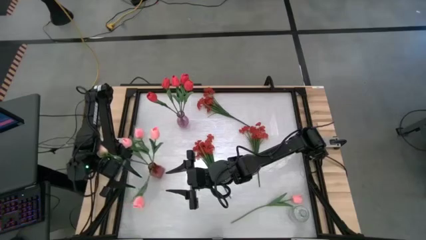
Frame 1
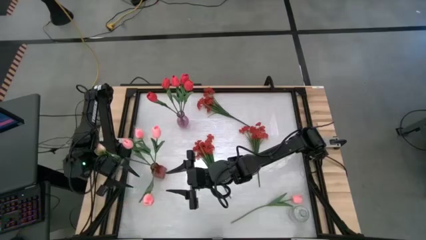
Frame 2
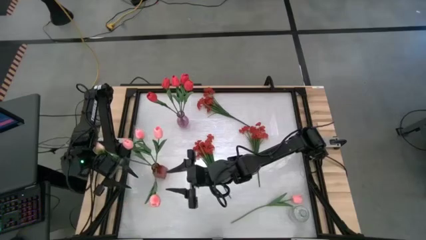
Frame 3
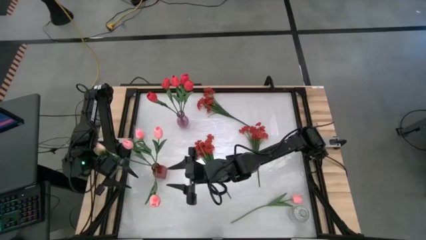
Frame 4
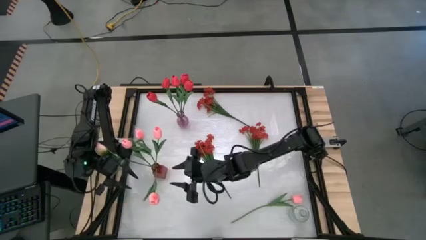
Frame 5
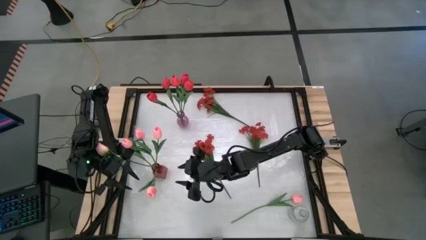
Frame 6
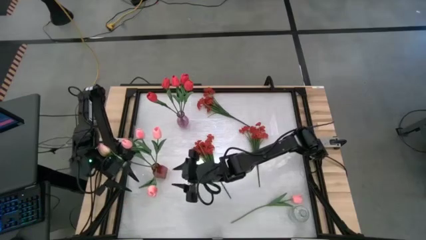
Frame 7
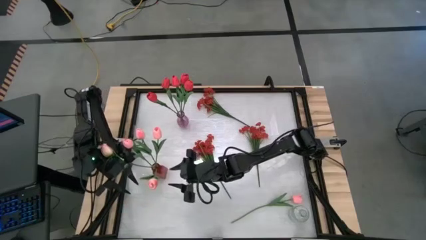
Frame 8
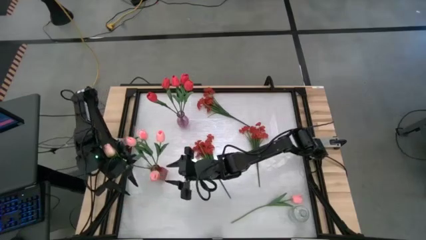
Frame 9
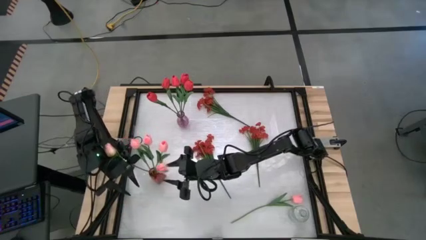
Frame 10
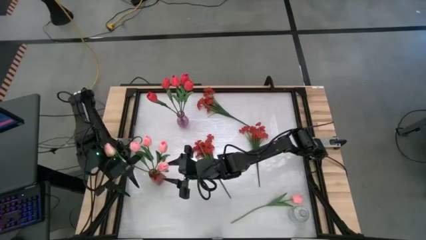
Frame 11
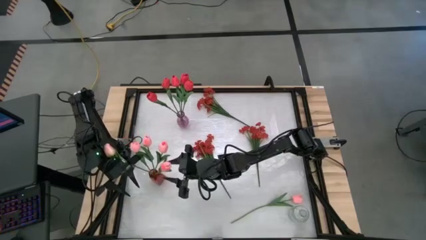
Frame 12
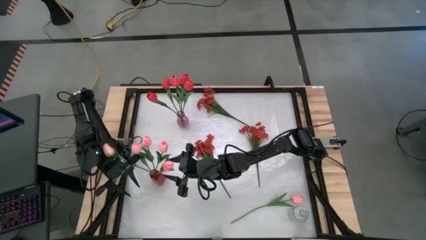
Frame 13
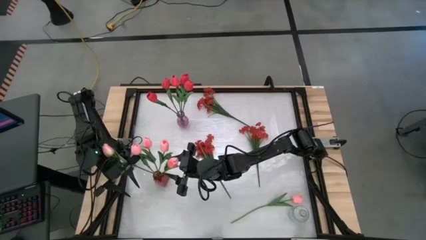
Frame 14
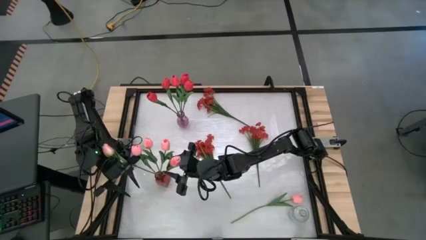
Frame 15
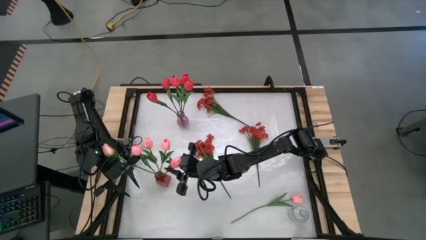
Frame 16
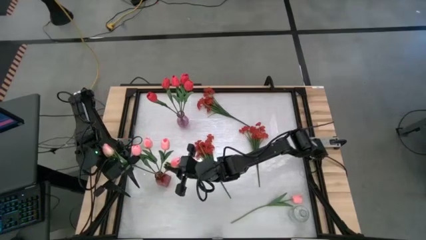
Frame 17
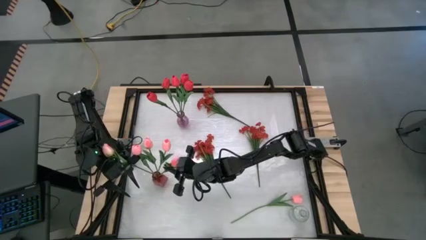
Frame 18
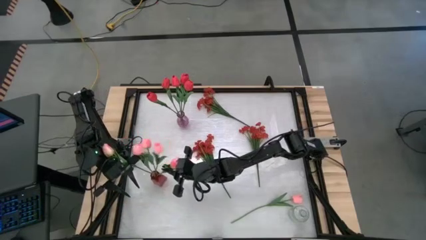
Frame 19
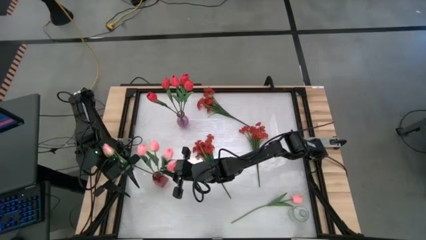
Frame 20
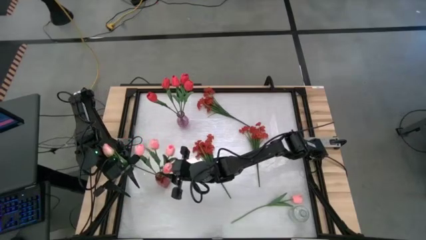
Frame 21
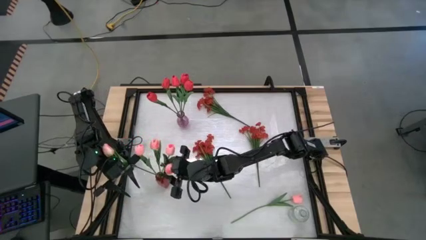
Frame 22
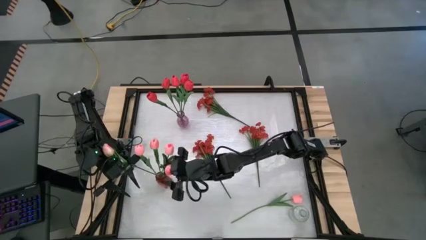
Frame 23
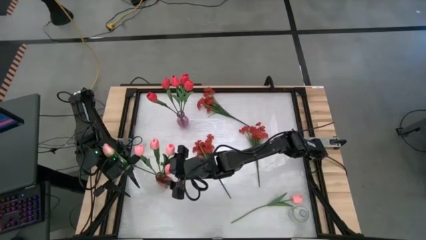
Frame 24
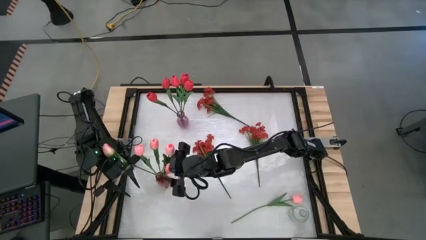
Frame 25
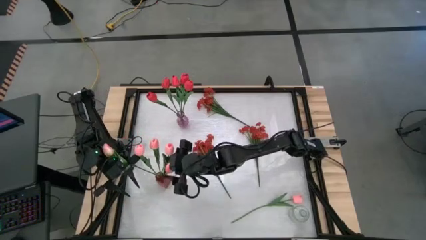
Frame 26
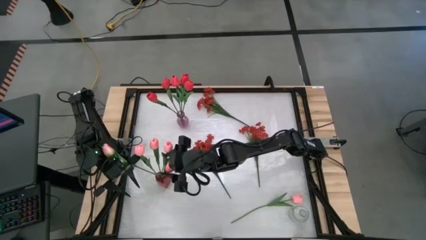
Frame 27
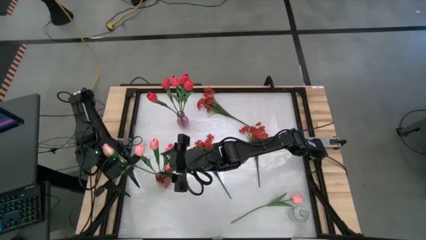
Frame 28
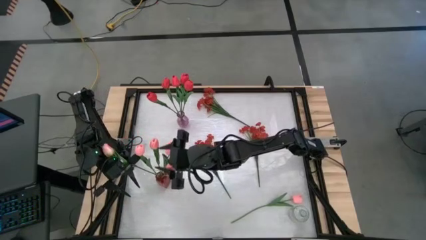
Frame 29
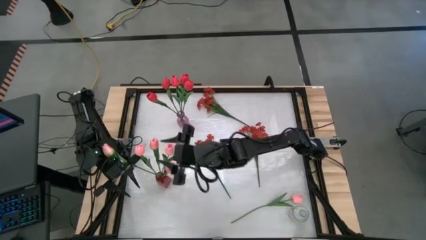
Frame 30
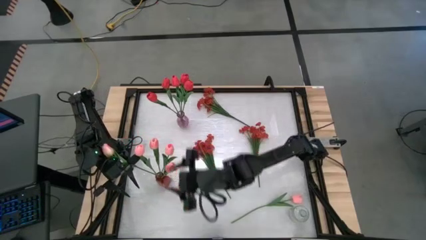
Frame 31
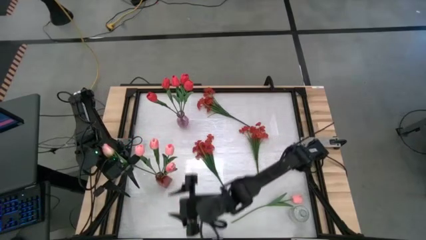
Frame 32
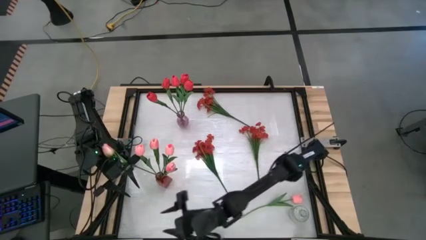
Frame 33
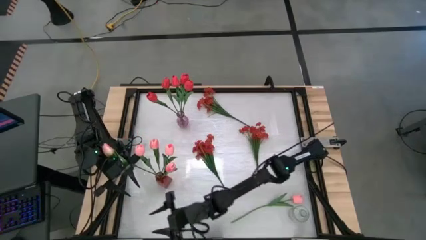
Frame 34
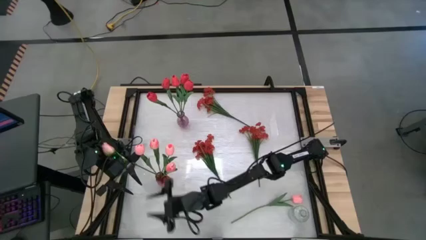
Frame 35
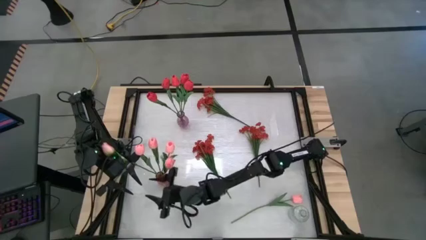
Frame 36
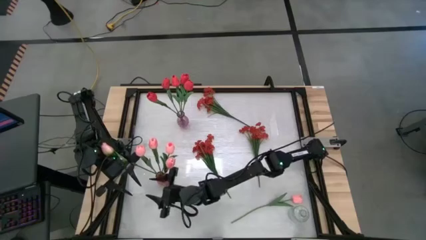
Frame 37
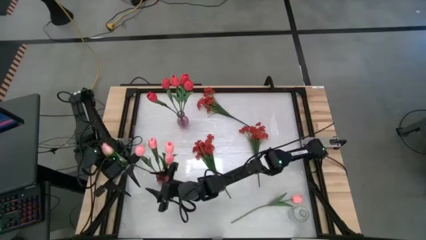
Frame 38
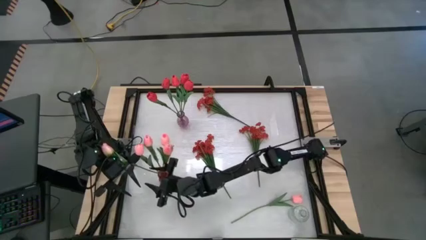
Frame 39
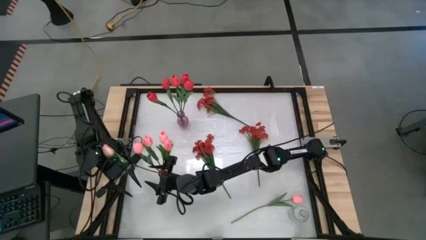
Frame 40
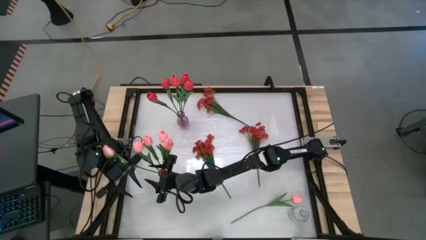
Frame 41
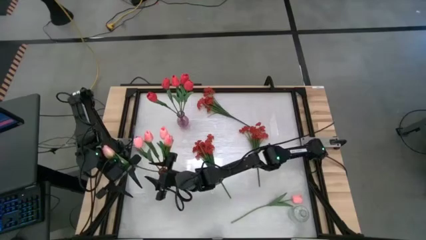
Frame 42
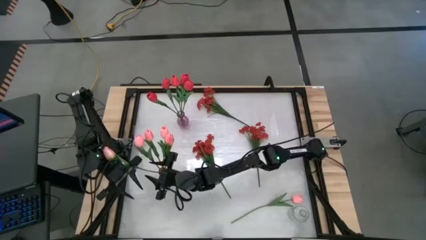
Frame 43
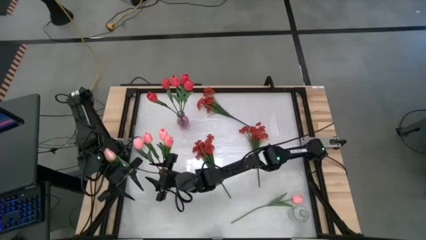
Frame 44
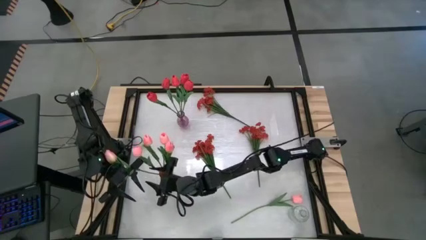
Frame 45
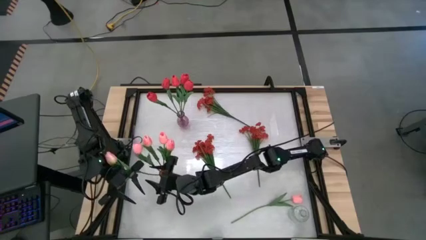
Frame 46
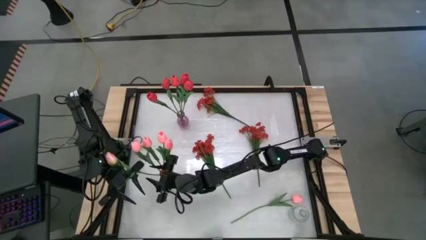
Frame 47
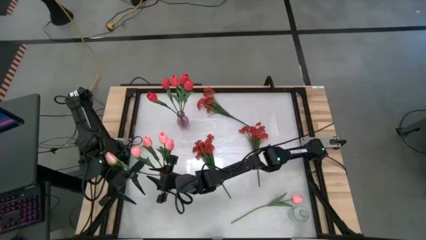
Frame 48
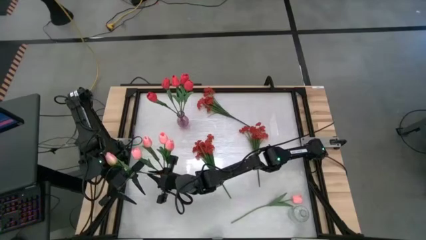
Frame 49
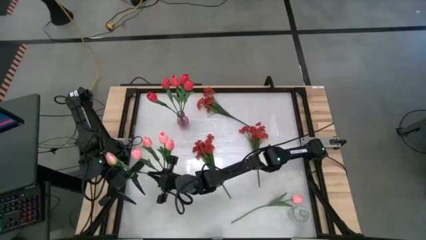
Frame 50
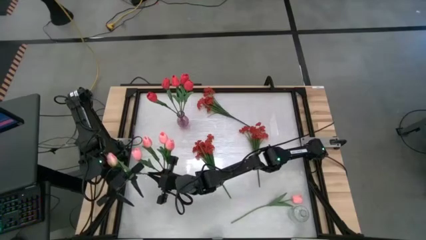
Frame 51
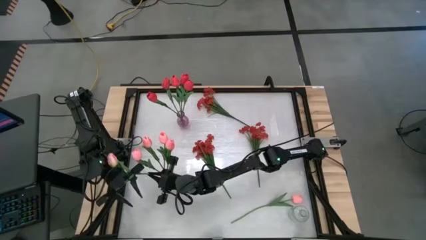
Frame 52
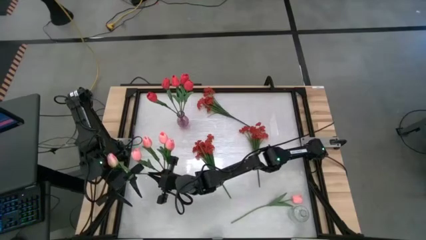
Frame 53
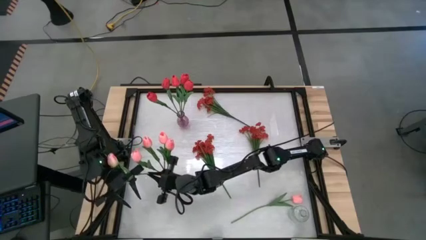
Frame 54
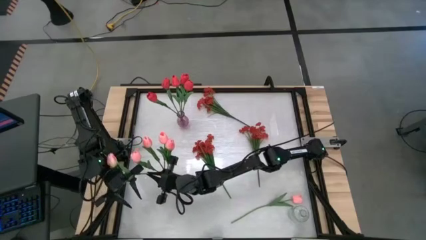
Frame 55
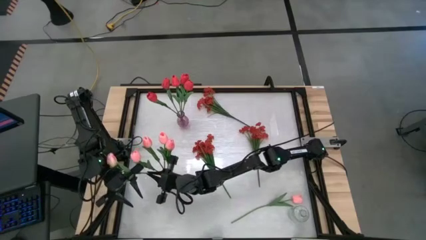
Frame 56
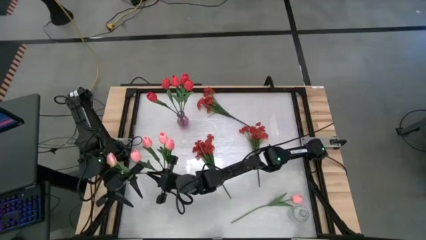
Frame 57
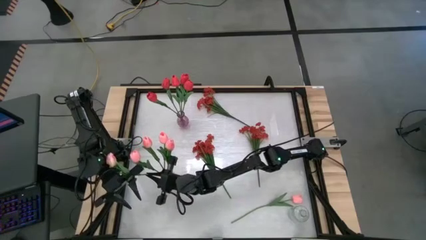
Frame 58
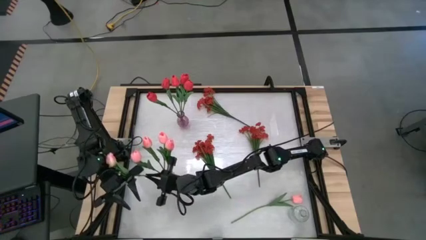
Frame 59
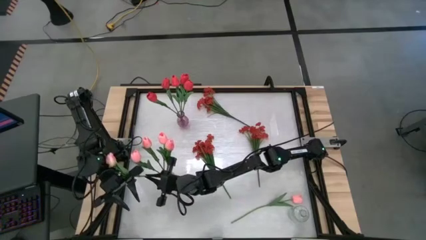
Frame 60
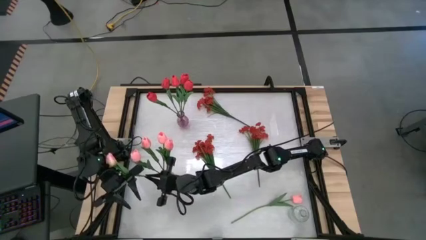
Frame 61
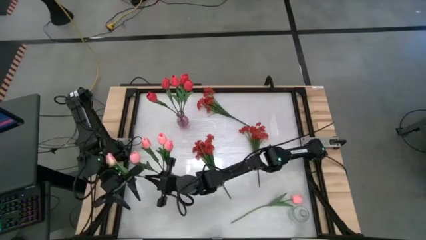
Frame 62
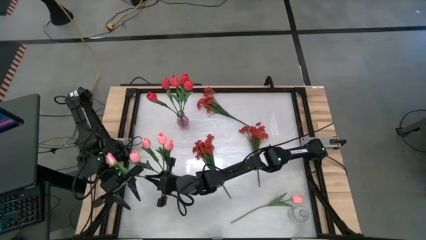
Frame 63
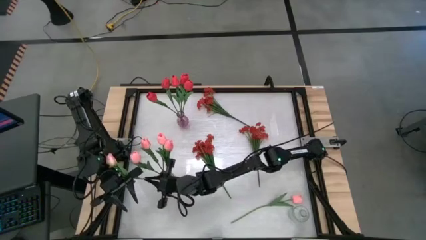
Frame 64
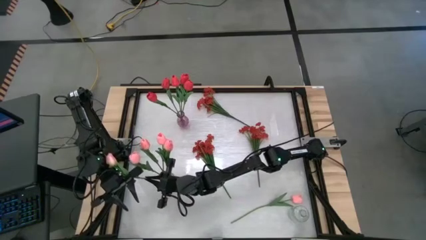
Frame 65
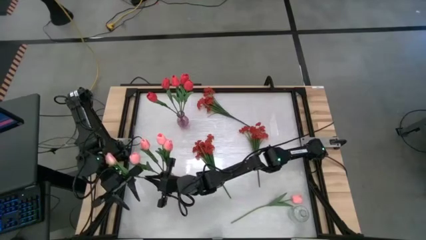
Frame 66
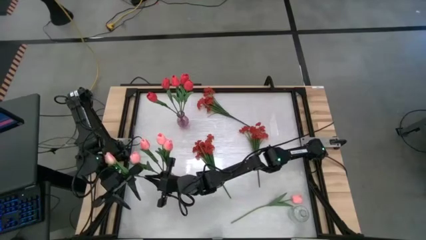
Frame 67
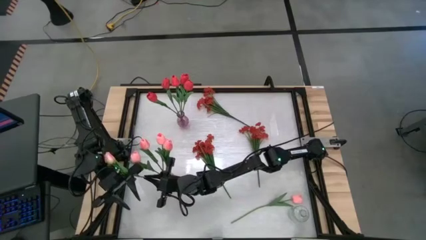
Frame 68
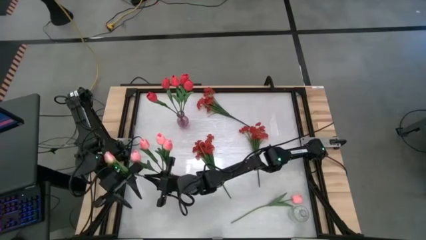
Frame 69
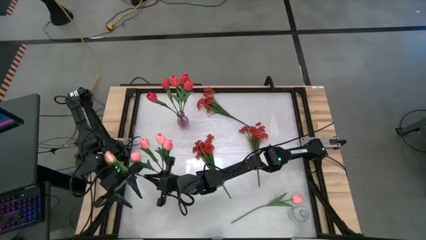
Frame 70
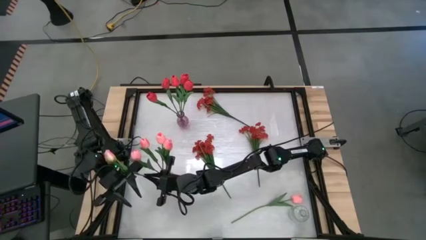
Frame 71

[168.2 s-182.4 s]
Task: Sort flowers into vase by color
Adjust the pink tulips in the red vase
